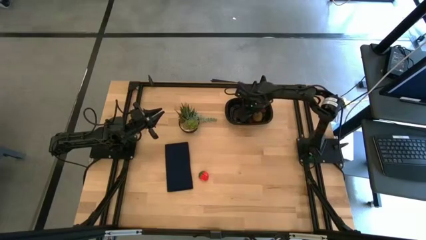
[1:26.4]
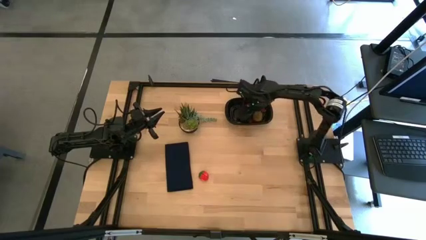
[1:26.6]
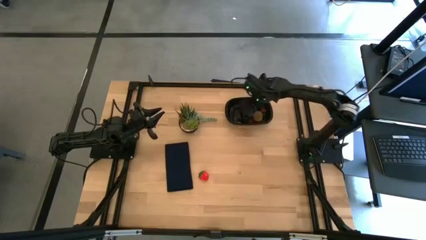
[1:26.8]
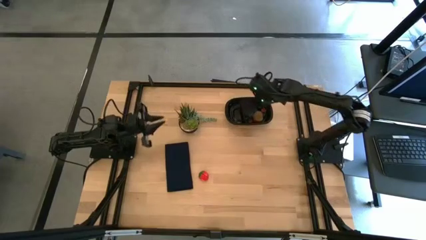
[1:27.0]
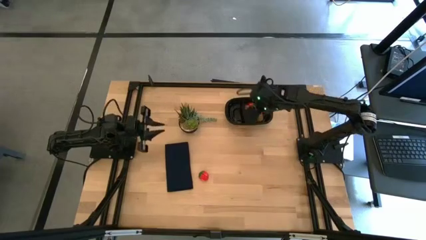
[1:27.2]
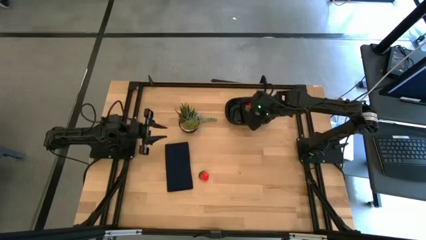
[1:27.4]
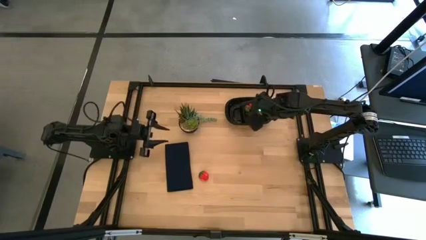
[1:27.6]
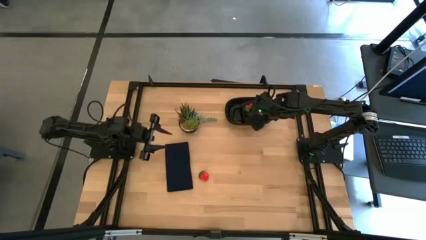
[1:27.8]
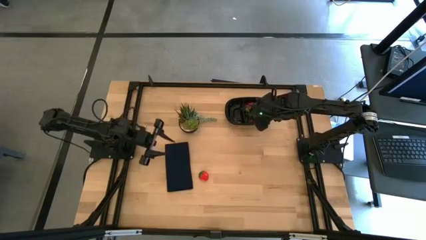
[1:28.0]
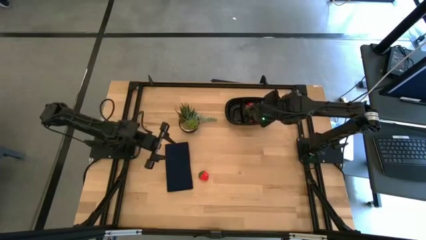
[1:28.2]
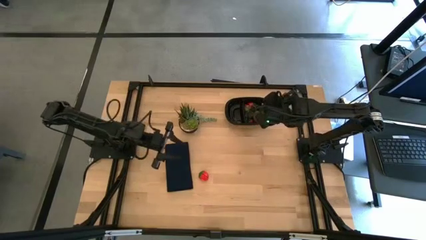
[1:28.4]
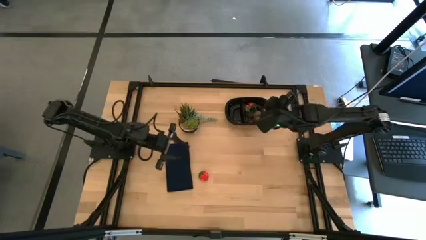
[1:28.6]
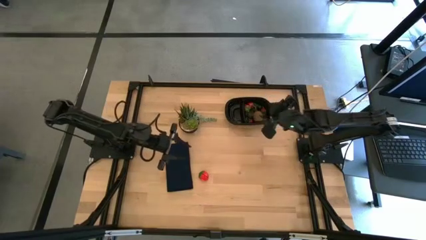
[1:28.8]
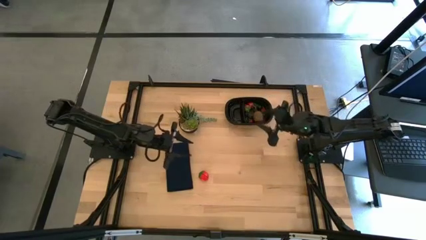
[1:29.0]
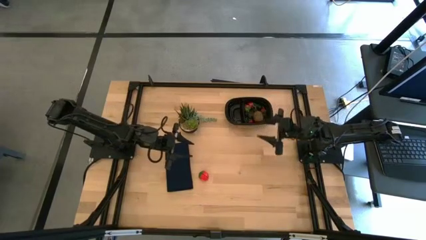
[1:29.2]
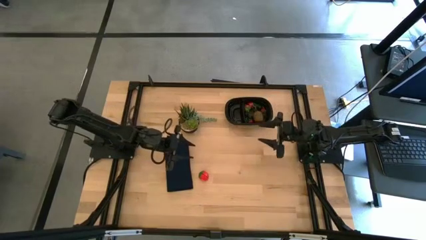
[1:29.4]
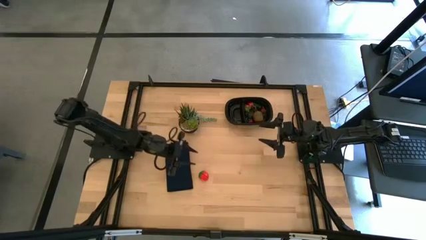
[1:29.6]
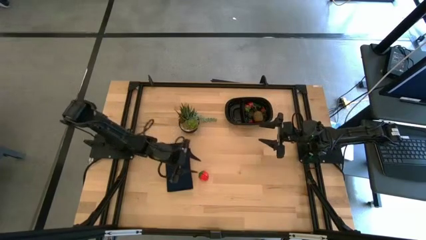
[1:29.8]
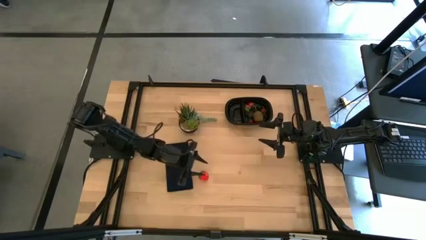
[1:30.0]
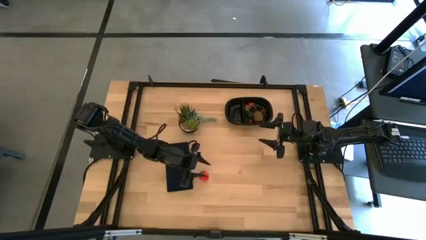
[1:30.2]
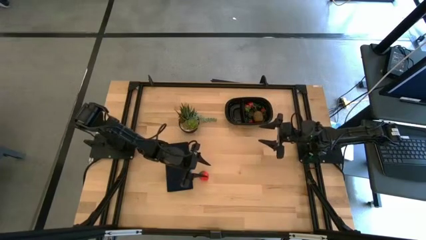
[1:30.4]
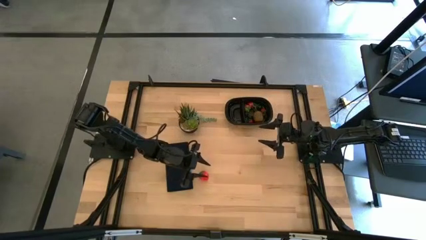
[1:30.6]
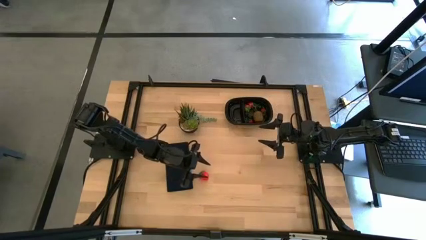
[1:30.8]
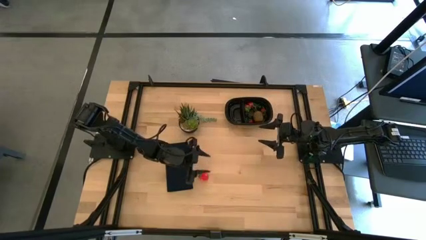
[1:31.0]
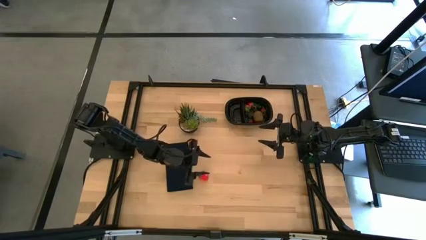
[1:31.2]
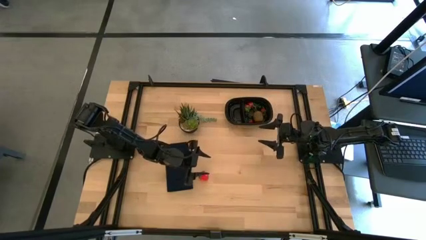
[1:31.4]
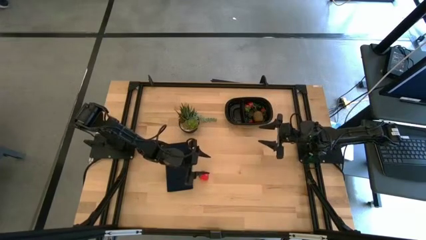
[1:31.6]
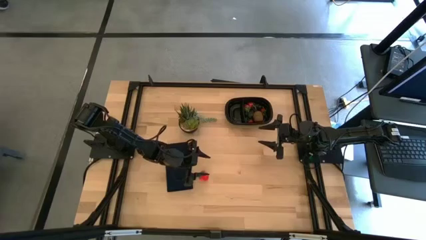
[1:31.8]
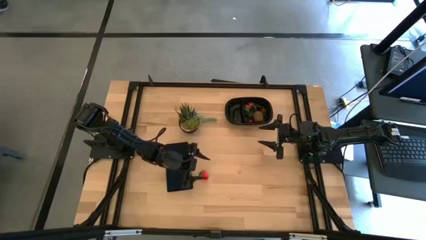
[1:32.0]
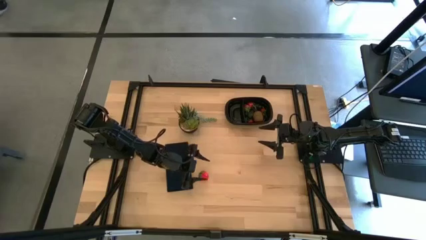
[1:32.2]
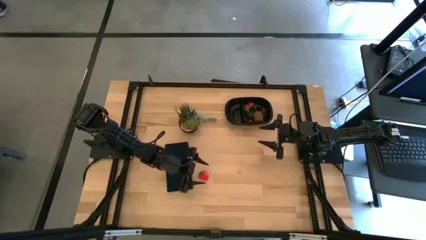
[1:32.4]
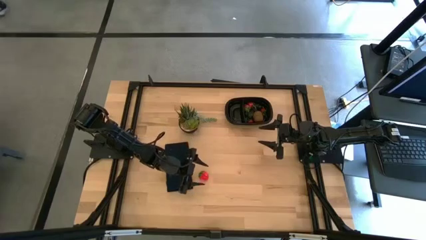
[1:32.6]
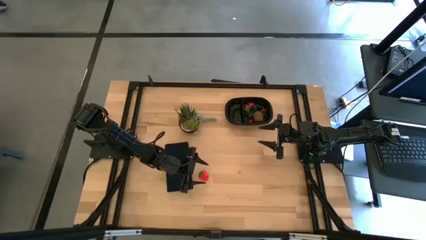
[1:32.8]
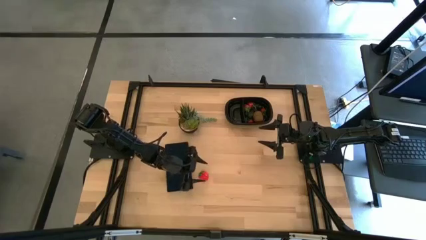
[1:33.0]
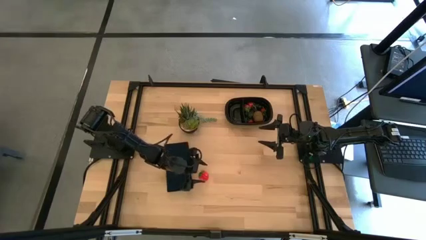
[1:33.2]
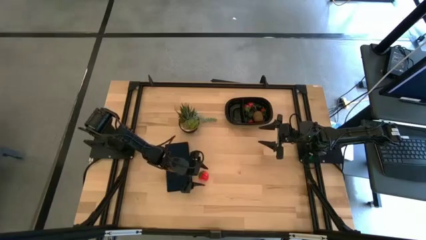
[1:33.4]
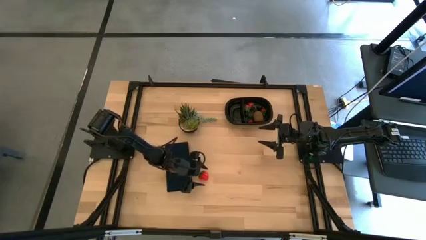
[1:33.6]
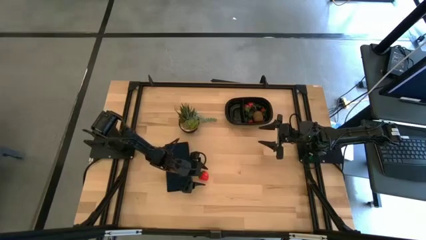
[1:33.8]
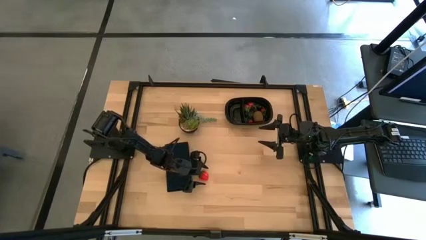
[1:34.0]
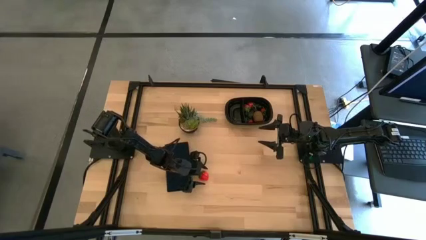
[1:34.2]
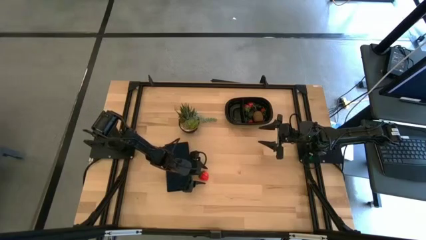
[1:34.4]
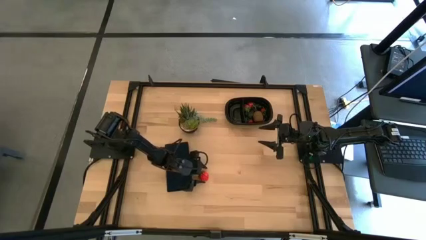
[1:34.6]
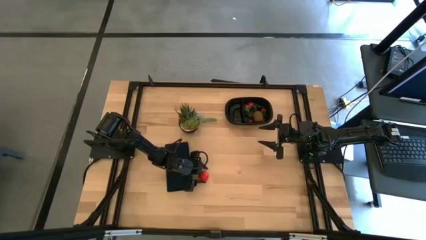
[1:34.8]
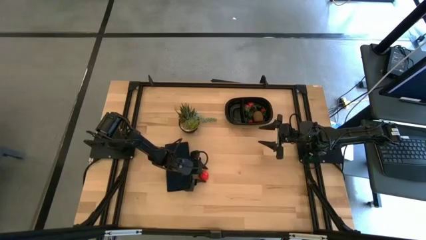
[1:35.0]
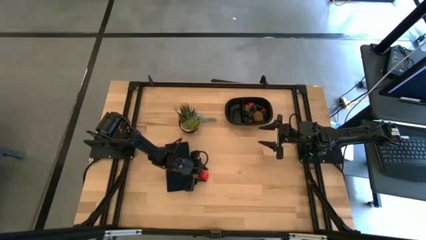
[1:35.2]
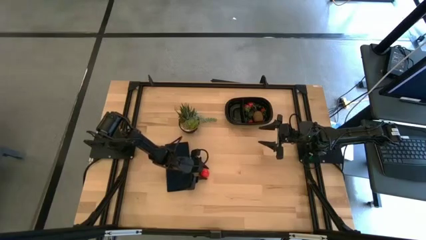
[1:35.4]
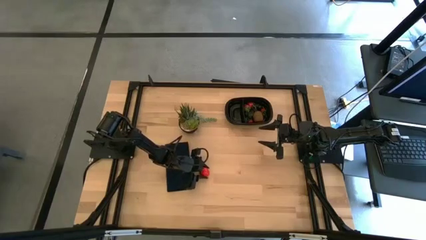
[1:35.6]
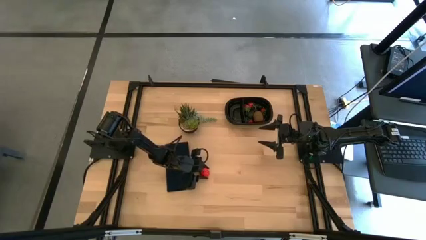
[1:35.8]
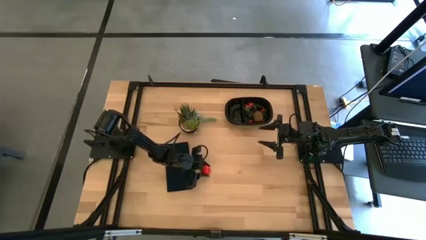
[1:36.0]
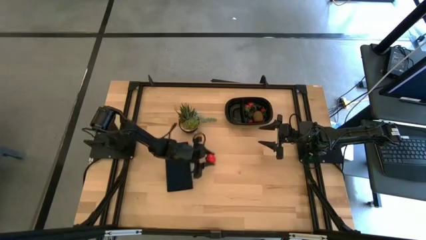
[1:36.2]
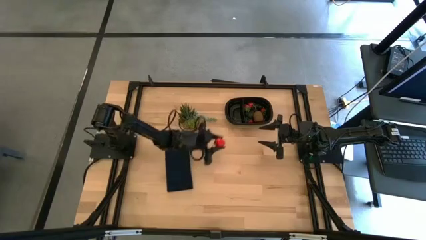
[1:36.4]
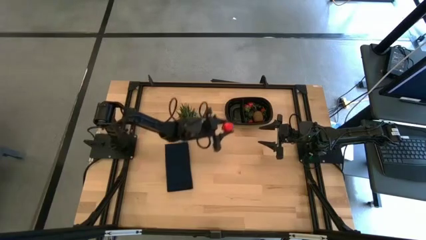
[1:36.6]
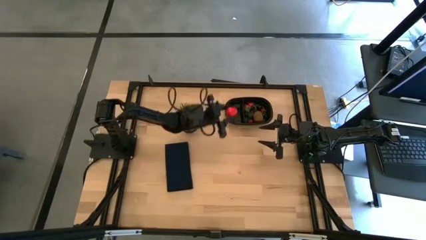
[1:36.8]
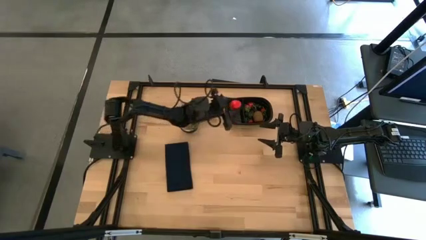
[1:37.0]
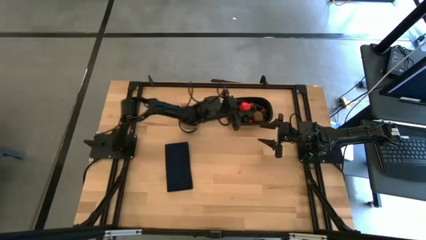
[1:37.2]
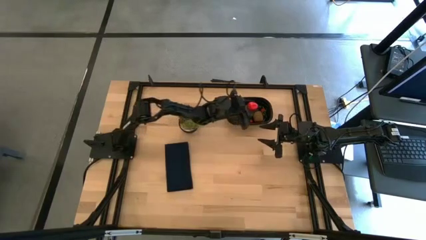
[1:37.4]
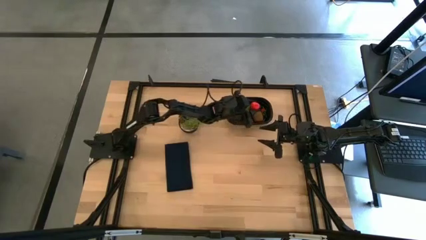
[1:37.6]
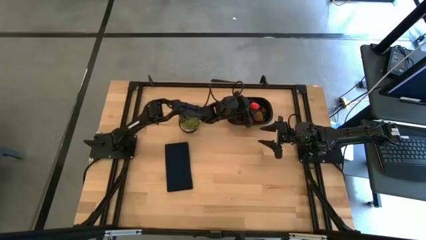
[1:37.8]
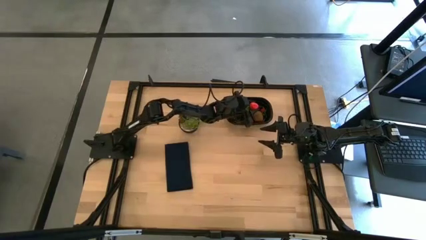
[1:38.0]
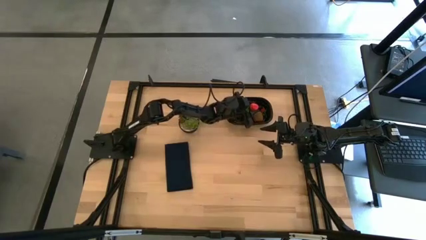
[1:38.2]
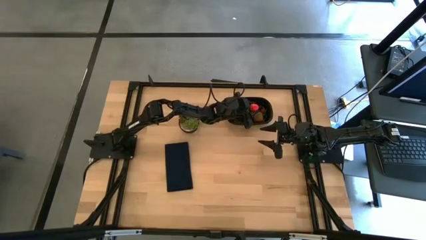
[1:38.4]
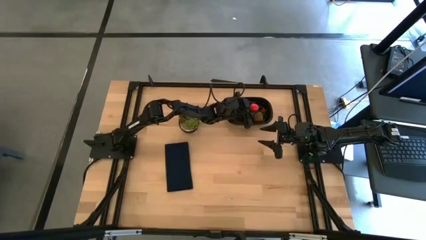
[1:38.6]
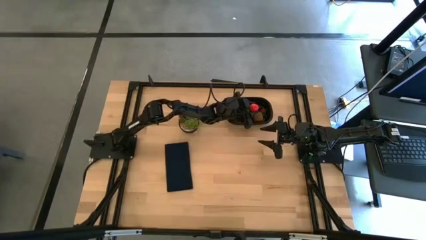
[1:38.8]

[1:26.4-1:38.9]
Task: Pick and placing Produce into tupperware
Put the strawberry into the black container

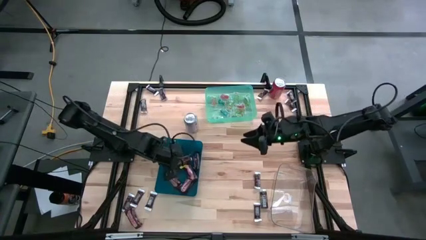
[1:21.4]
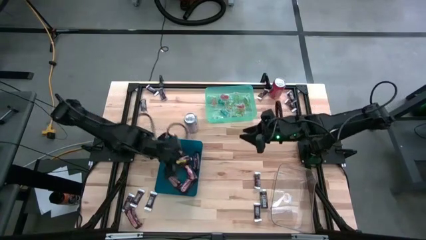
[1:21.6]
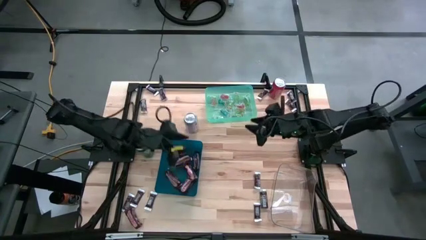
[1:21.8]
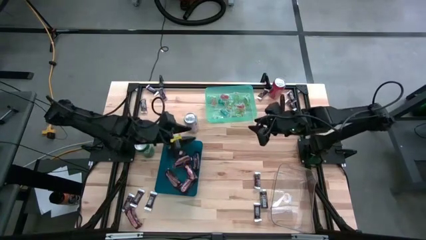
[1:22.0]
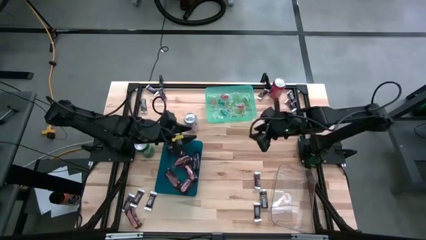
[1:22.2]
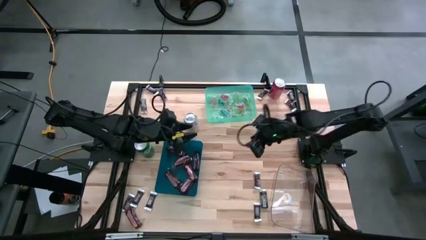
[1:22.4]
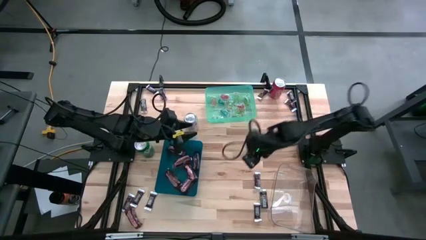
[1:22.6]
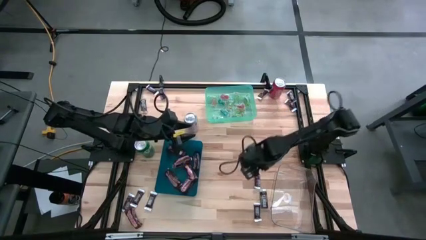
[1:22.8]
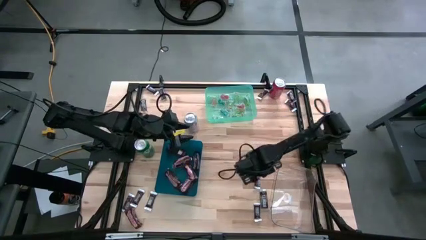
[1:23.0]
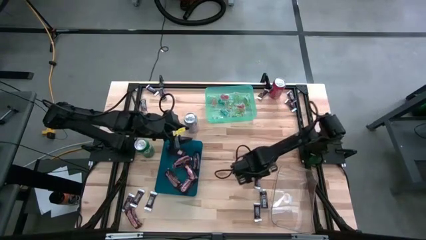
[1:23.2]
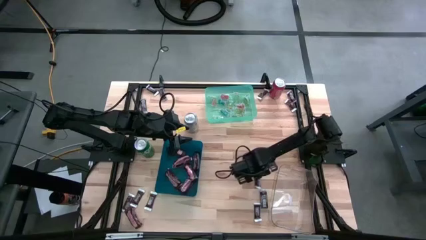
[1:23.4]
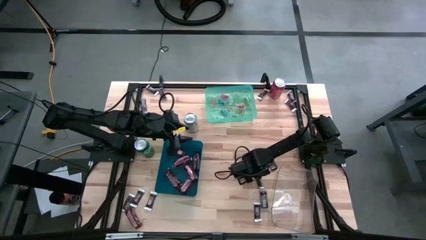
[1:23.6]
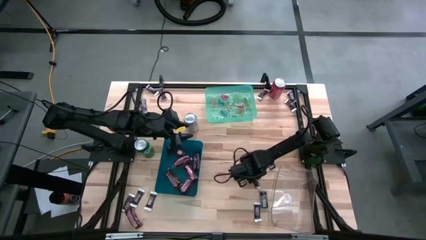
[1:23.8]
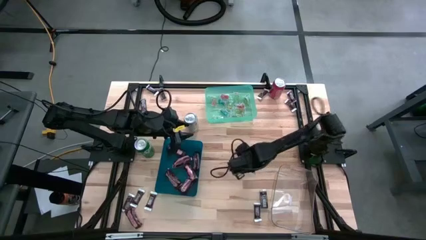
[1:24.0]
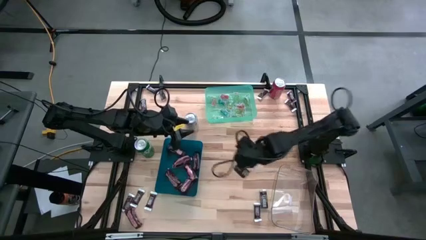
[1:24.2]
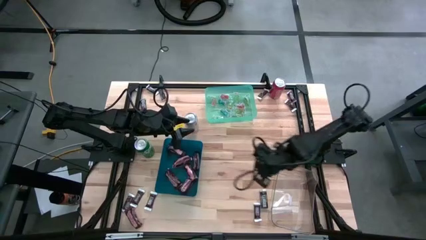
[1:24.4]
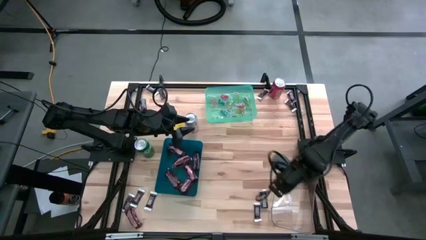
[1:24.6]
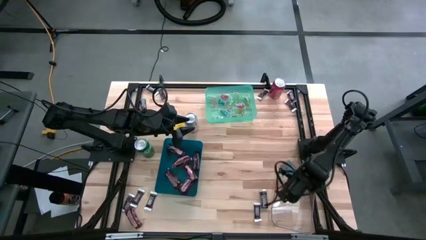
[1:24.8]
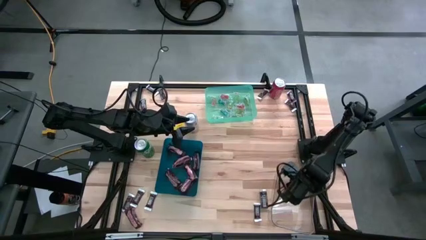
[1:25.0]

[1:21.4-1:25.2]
Task: Organize candy in baskets
Put the dark brown chocolate into the blue bin

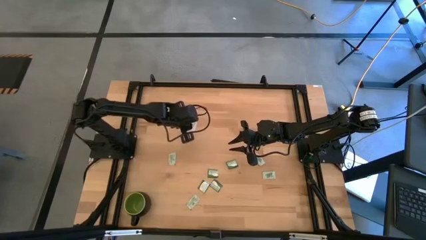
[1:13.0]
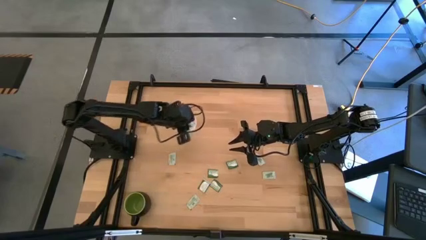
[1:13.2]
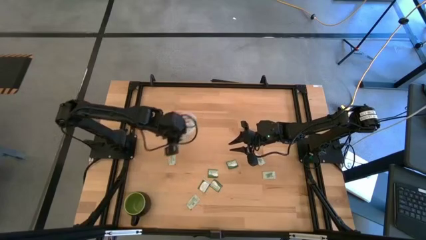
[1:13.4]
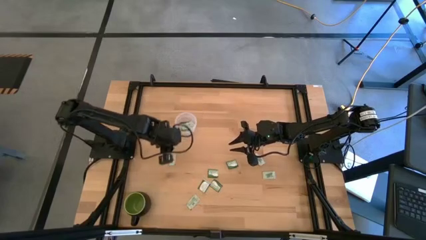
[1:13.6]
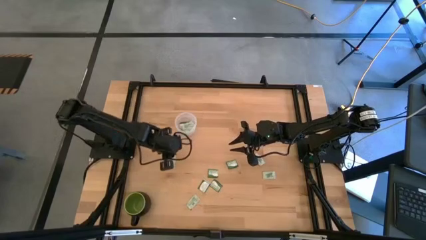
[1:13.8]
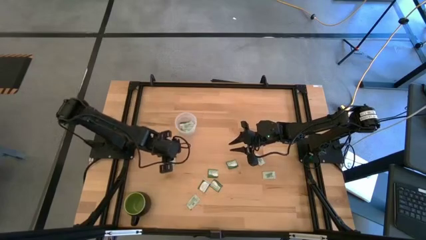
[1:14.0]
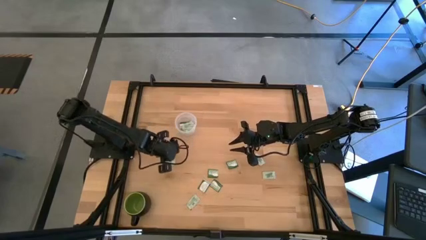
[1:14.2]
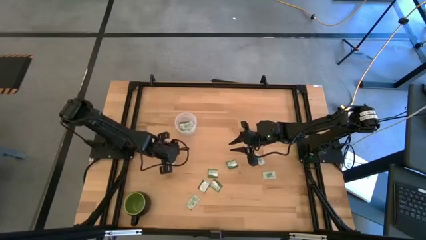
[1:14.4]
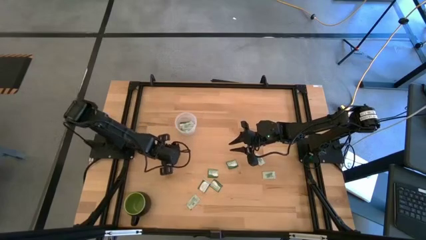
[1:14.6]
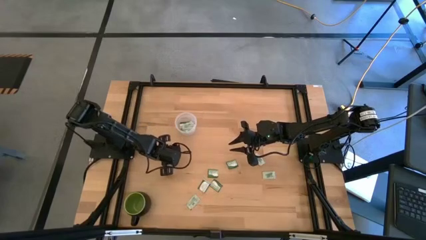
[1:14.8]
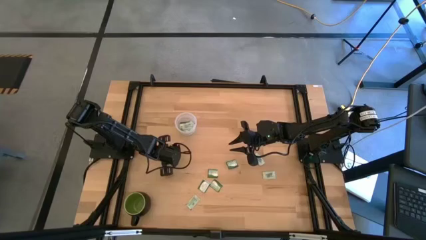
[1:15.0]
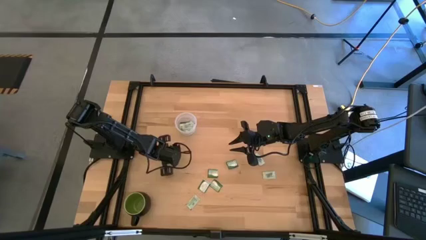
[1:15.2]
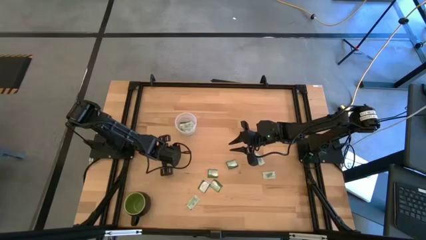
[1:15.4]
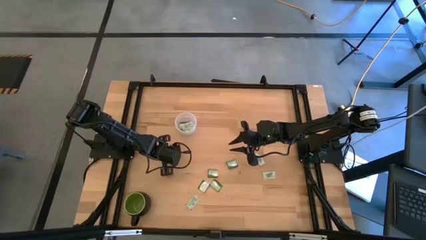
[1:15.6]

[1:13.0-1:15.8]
Task: Pick and place Stevia / Truvia into bins
Put the light green stevia packet into the transparent container
